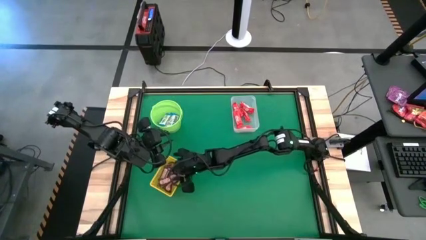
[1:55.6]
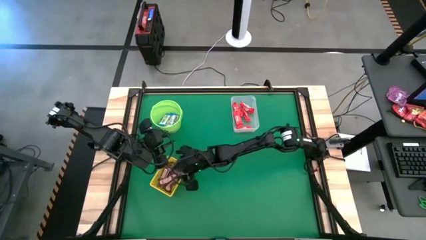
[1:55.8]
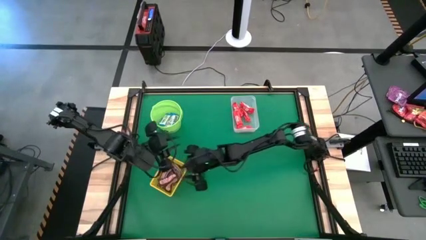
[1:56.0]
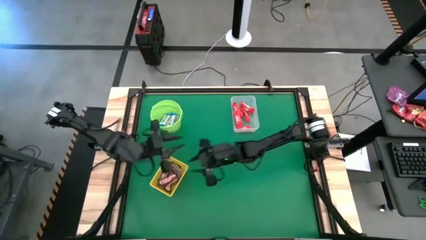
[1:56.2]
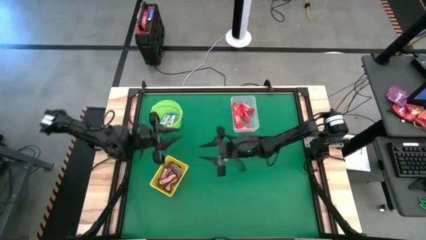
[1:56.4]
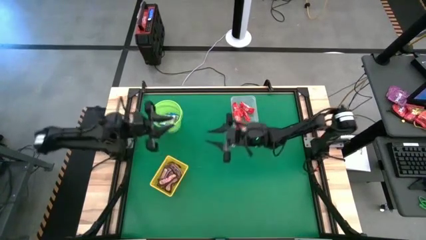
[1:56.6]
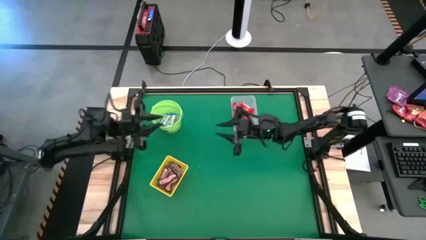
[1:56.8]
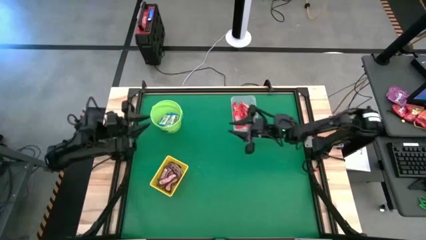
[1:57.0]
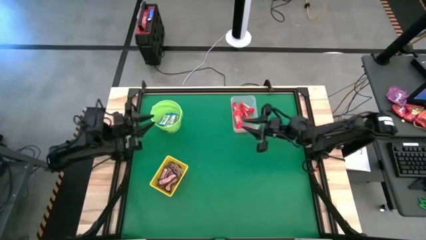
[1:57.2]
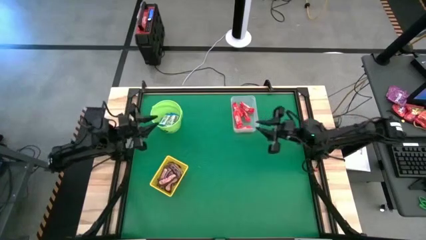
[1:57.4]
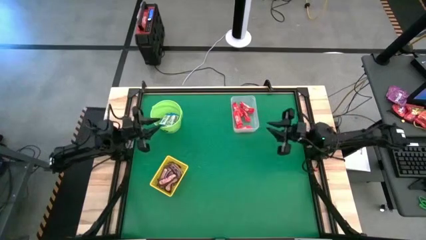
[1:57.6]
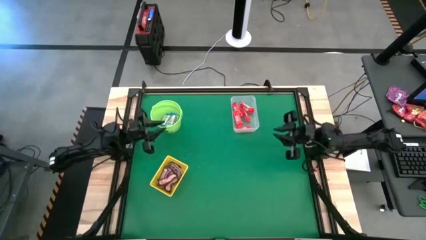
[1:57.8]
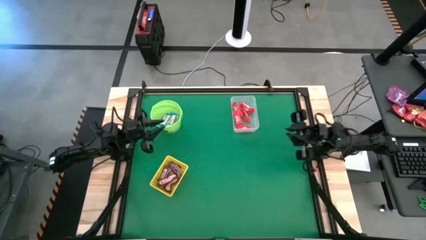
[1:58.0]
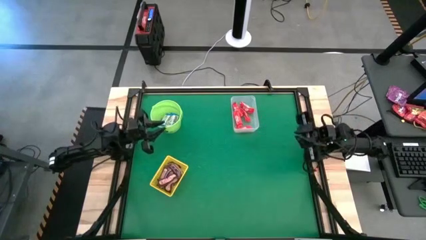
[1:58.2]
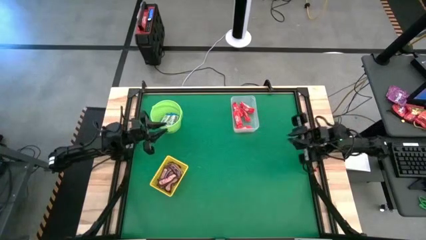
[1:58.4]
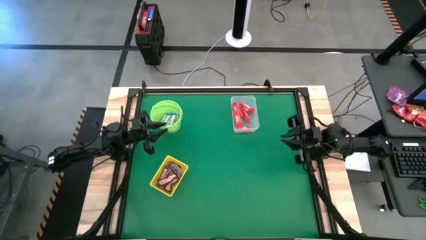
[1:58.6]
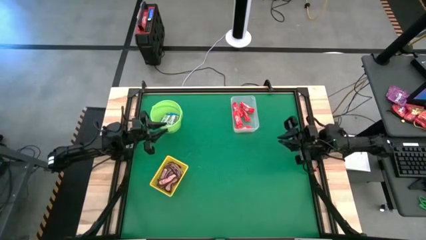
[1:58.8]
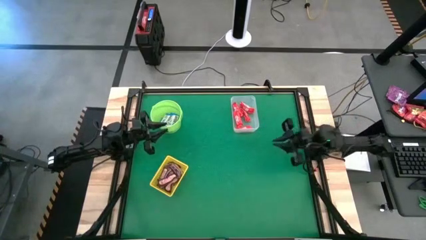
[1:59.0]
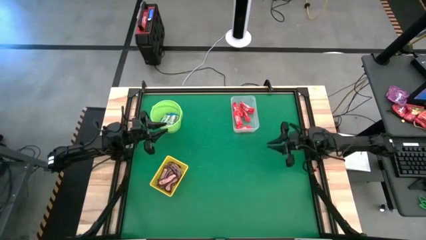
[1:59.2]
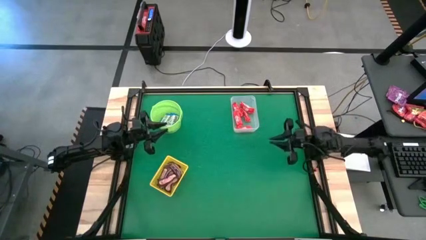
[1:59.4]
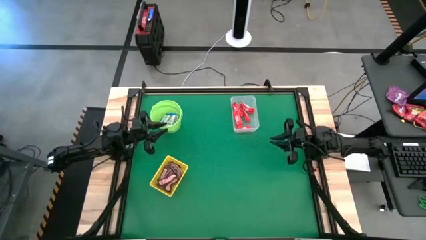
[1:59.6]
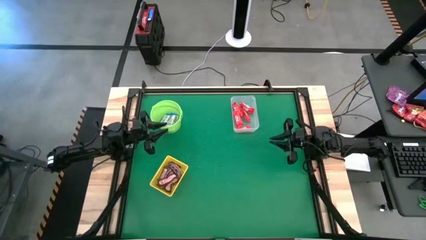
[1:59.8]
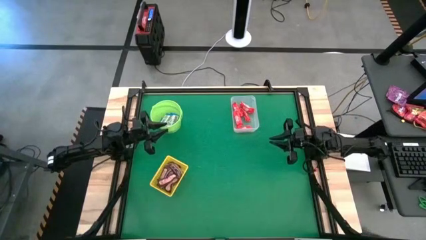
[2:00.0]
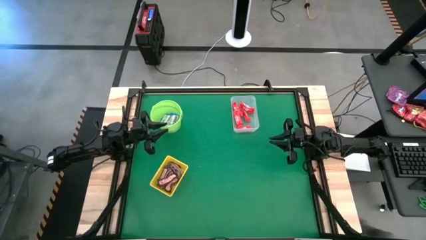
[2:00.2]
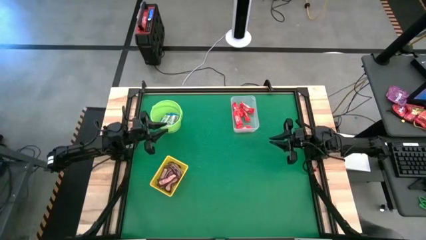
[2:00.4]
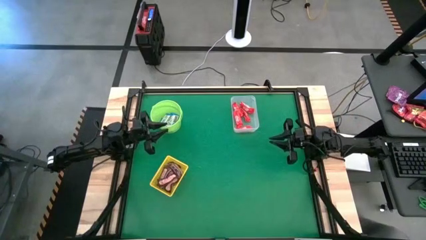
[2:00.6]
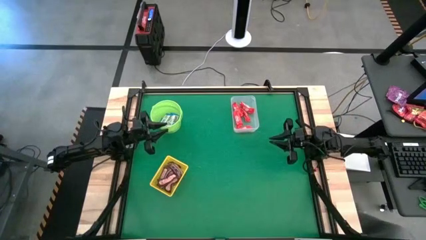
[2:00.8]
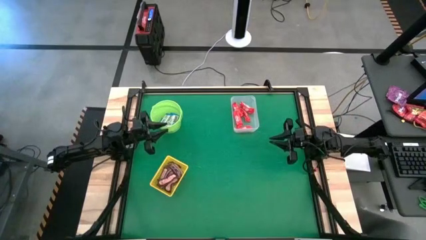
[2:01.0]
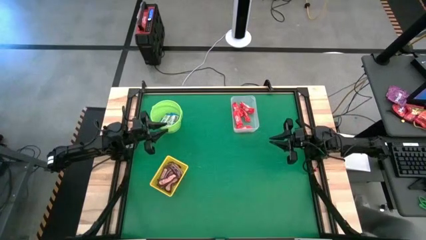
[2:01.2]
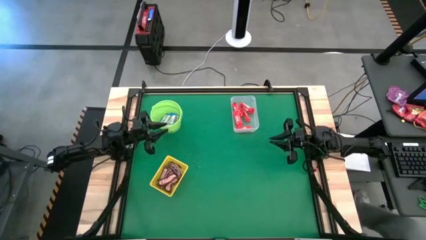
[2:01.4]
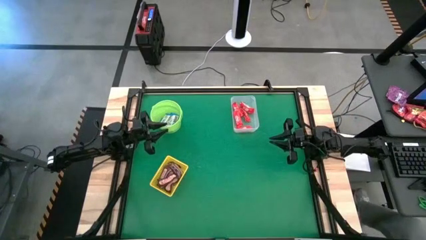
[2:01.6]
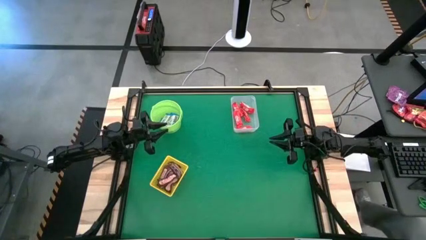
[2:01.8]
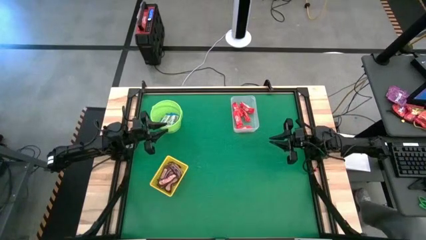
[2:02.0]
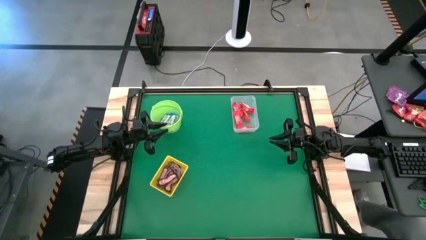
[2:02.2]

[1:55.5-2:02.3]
Task: Sort candy by brand, put in halloween buckets
Return to Home Position

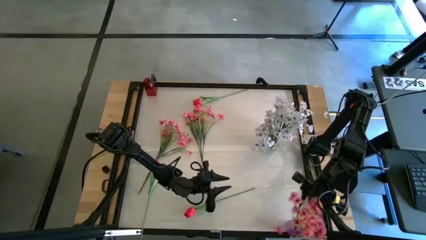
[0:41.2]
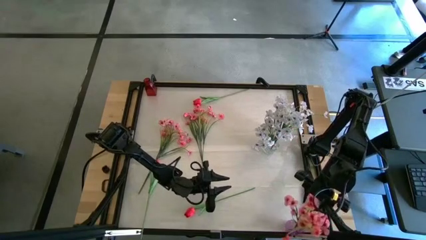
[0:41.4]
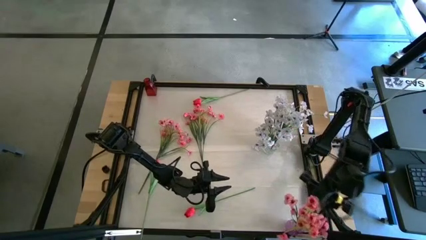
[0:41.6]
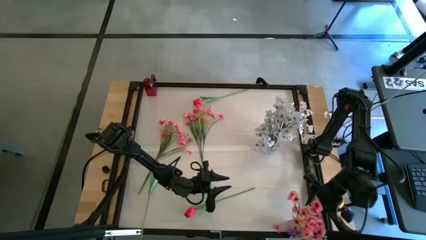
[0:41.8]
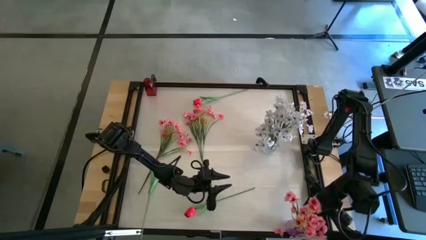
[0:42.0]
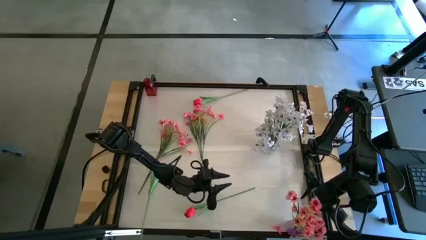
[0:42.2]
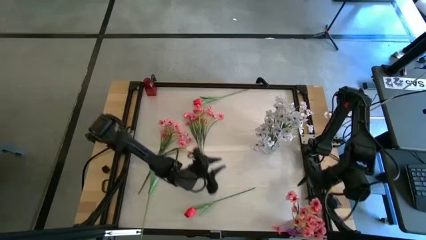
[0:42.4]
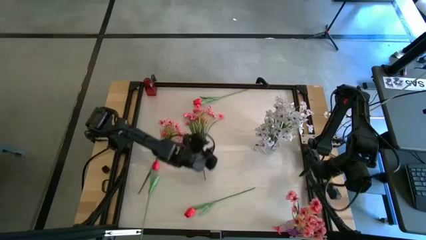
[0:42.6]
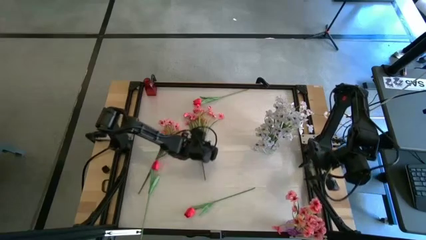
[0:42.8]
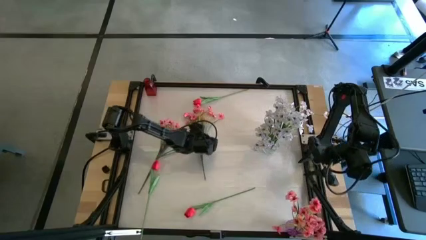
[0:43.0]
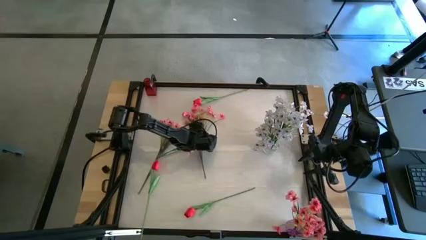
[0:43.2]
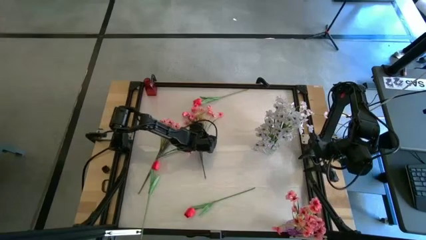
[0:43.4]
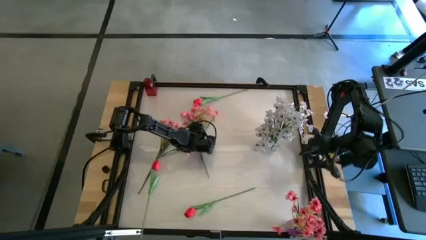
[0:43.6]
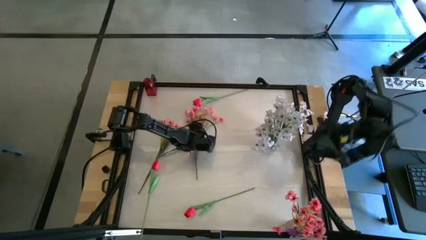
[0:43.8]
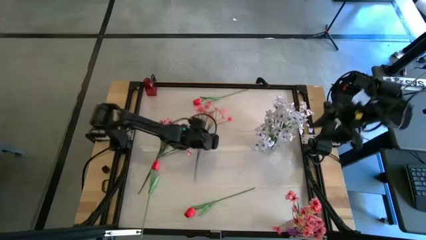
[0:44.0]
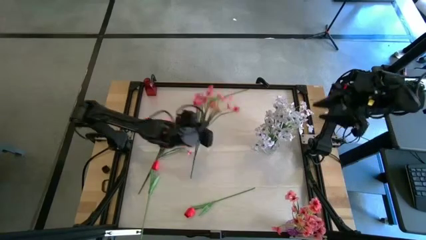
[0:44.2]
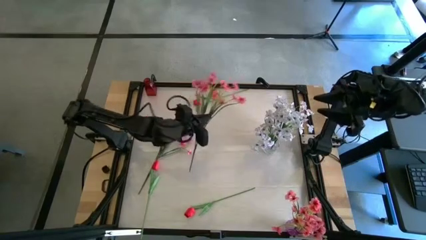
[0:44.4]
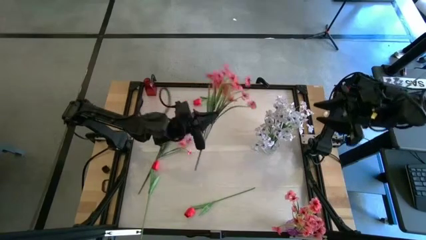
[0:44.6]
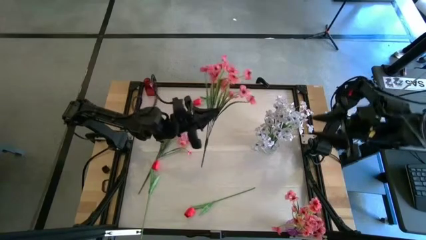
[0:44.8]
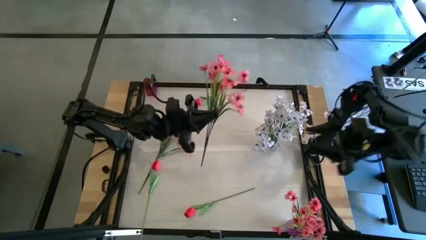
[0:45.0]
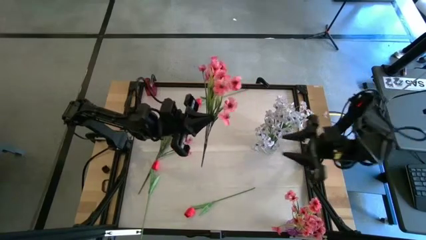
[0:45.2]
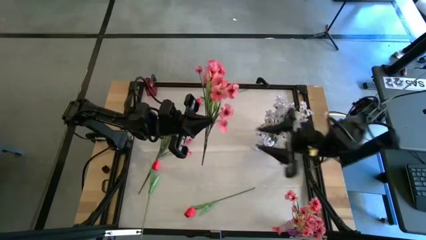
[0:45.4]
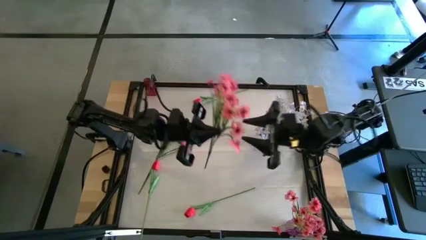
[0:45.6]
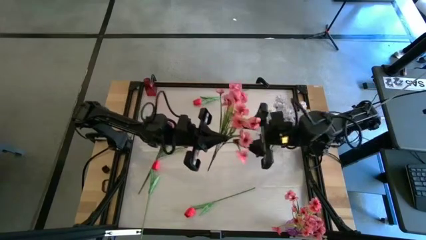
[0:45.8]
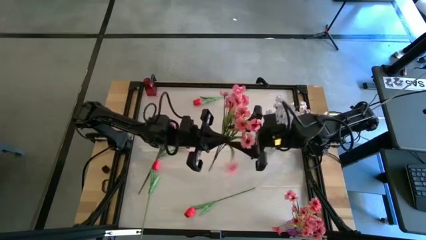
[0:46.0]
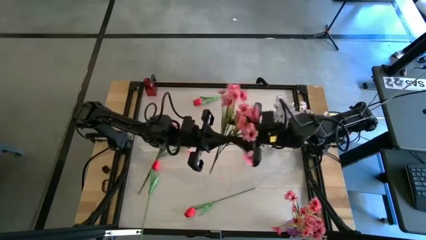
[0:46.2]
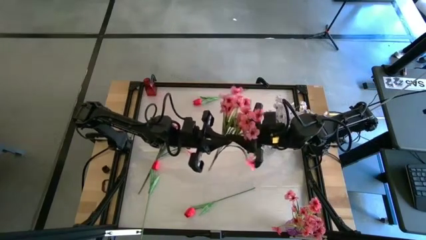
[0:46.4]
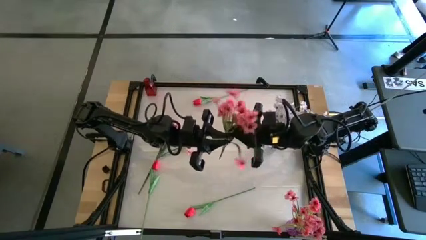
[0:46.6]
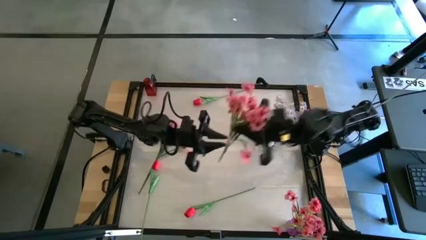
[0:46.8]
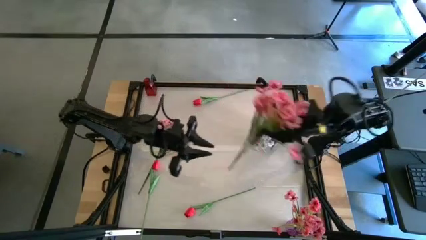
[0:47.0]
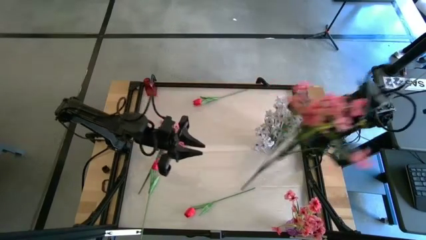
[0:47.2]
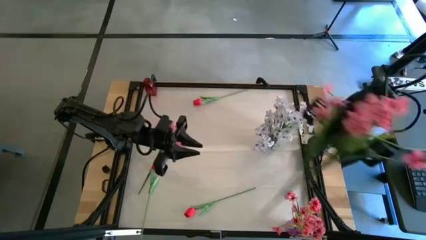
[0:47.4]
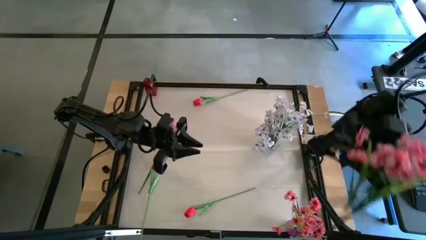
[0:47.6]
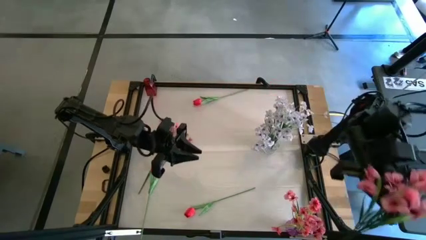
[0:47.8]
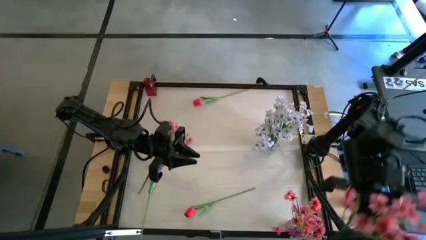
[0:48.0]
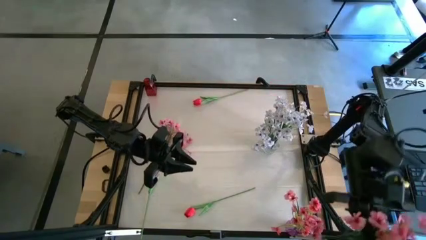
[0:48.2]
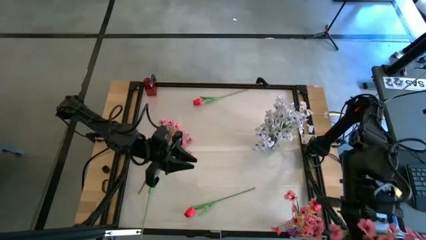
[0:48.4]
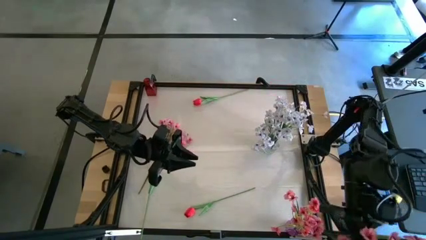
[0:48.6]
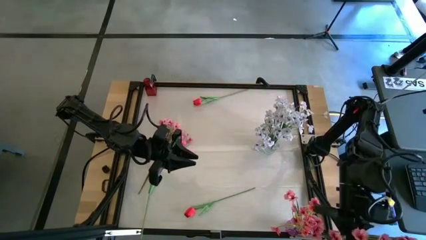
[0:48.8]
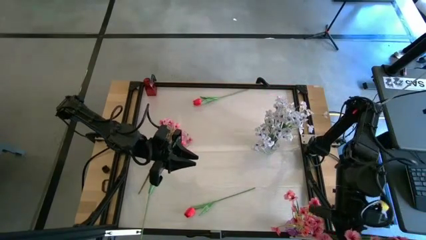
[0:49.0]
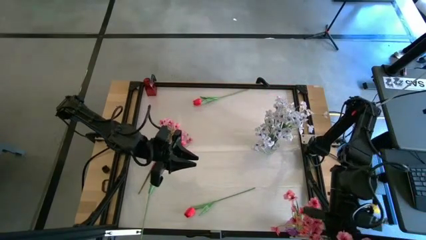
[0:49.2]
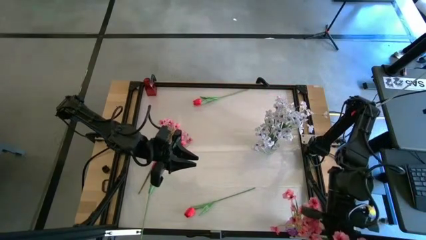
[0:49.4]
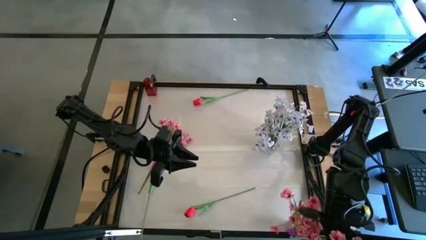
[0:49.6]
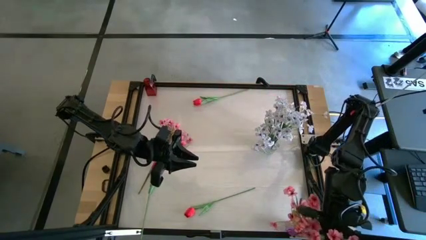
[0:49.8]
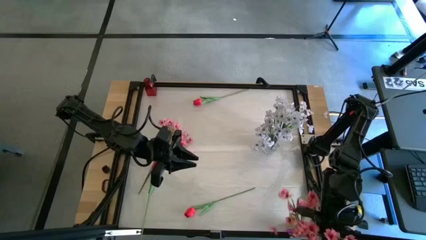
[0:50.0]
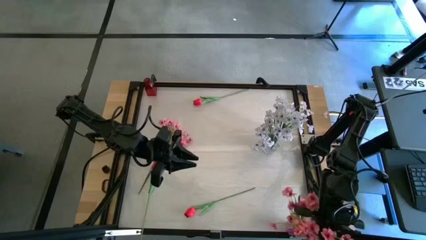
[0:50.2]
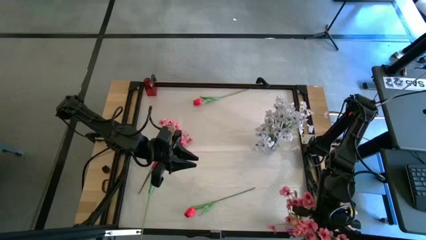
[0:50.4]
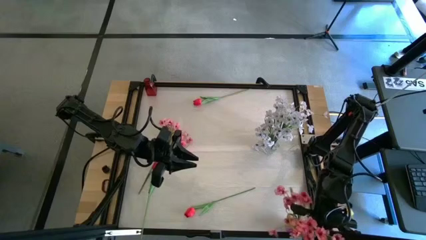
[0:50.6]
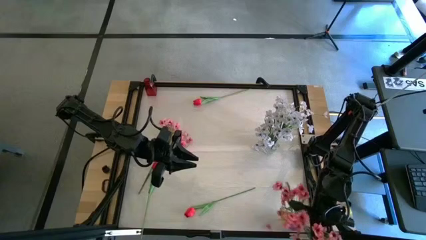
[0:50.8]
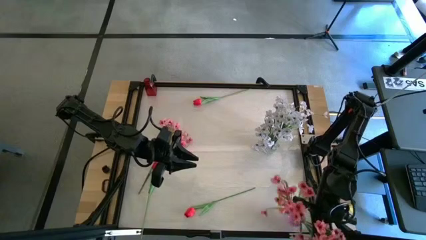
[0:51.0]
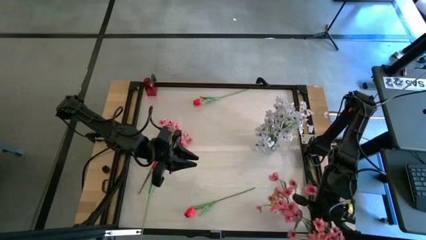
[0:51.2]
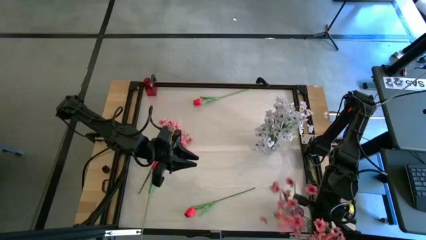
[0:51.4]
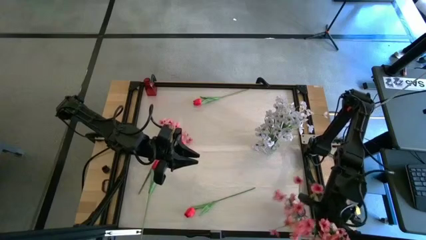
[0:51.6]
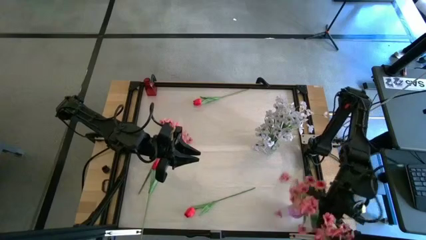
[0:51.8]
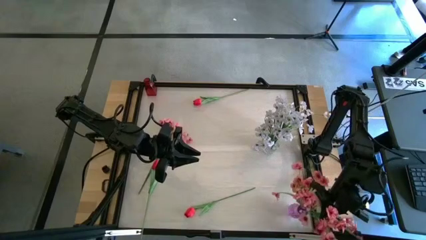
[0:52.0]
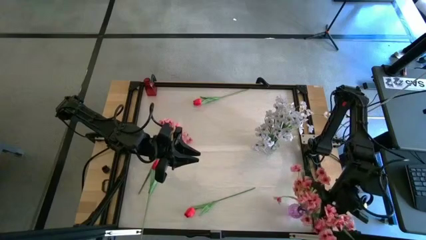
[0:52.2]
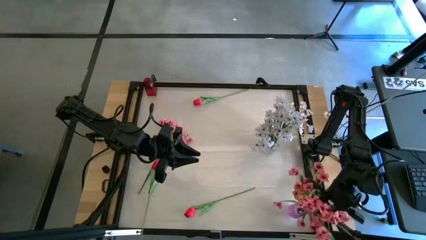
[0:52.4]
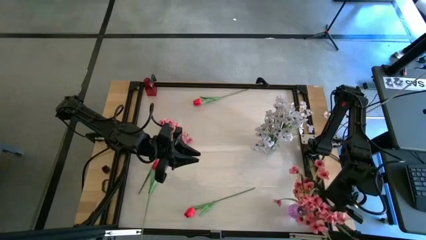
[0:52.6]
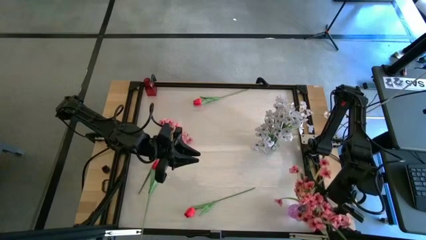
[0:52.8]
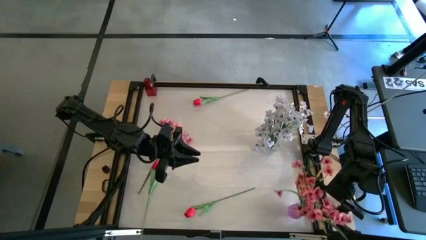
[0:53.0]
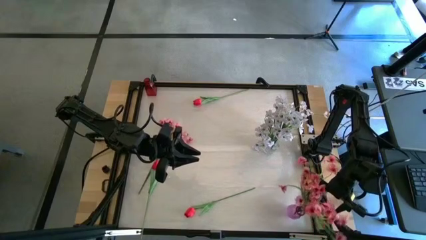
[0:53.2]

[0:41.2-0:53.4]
Task: Sort flowers into vase by color
Put the right pink flowers into the violet vase
